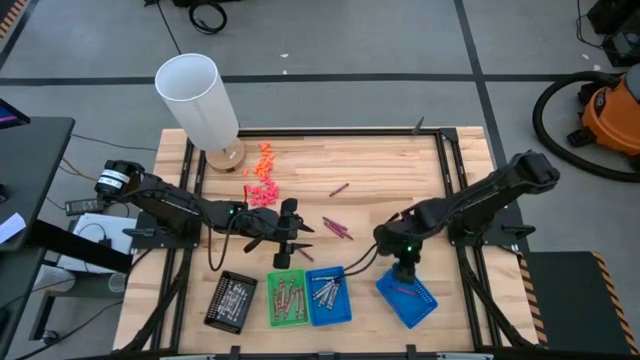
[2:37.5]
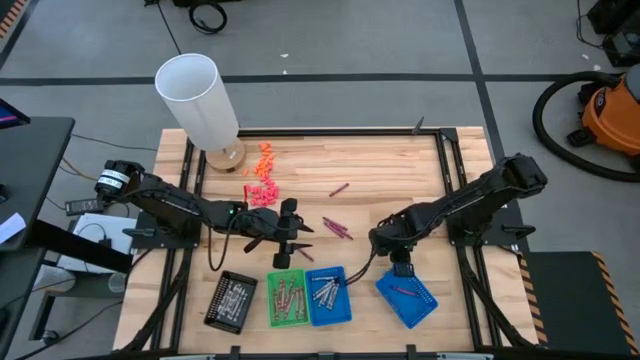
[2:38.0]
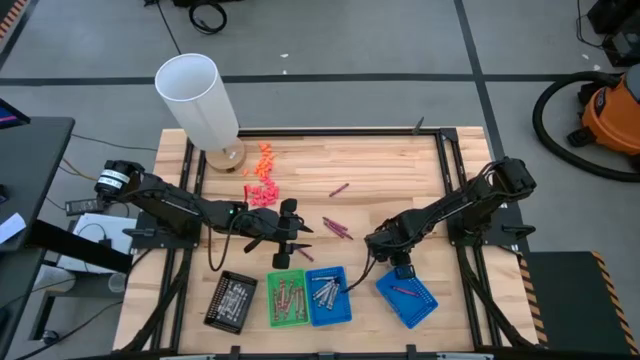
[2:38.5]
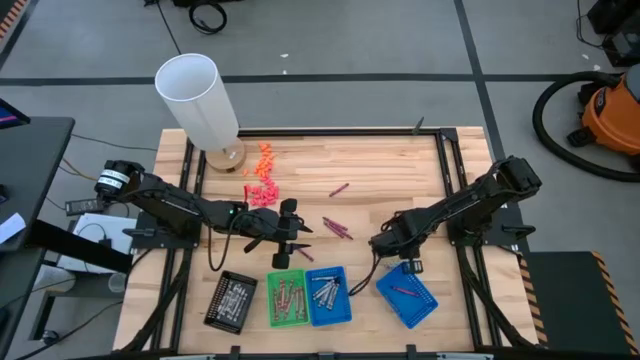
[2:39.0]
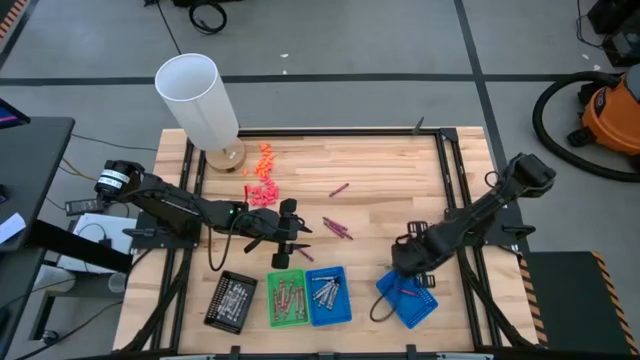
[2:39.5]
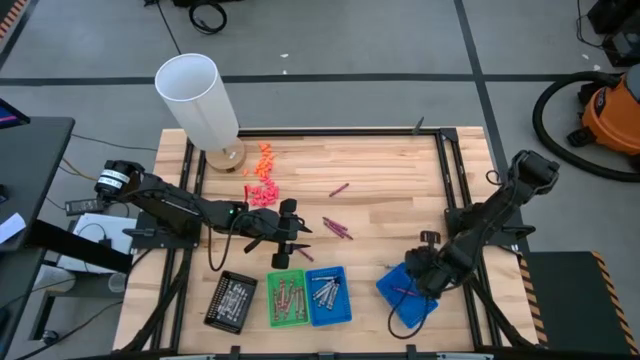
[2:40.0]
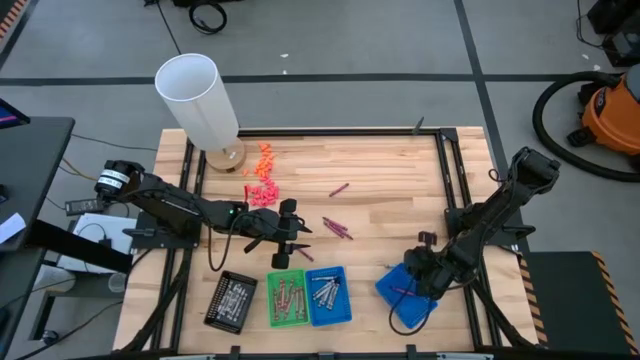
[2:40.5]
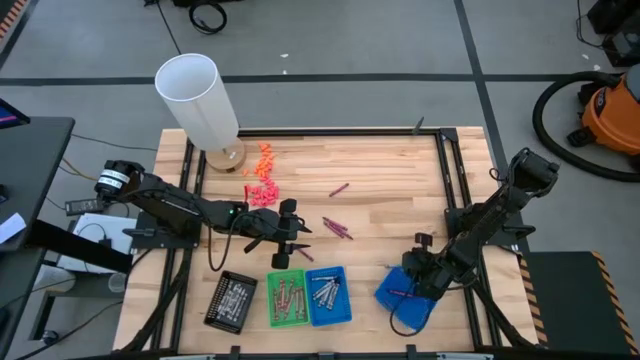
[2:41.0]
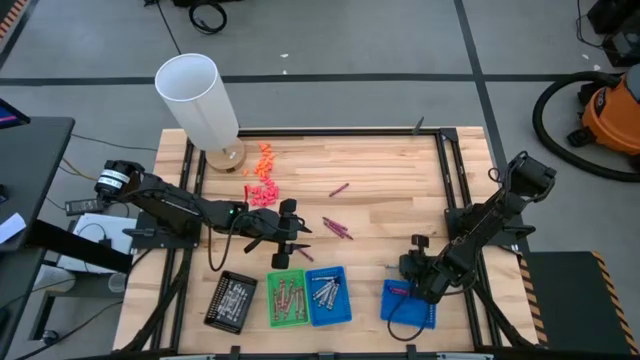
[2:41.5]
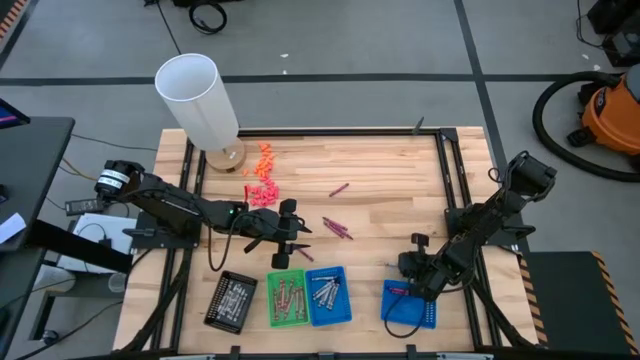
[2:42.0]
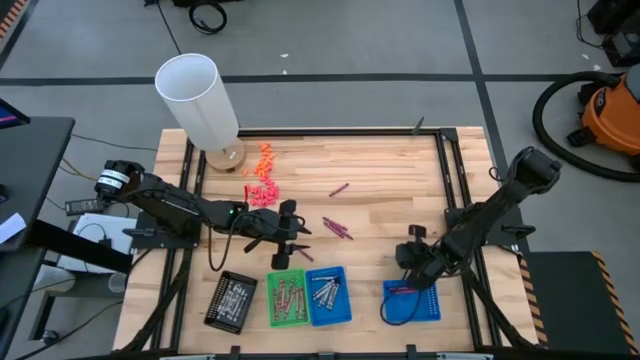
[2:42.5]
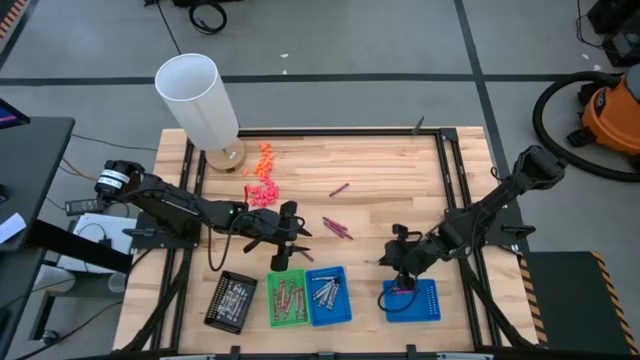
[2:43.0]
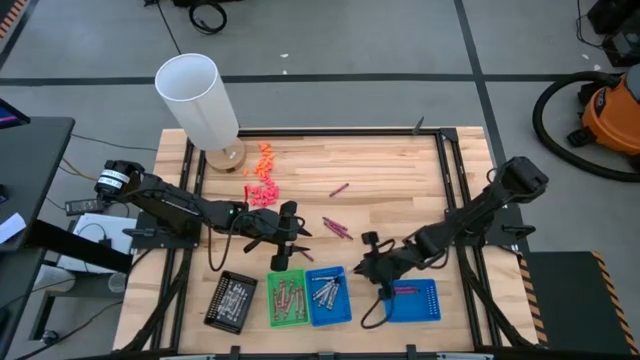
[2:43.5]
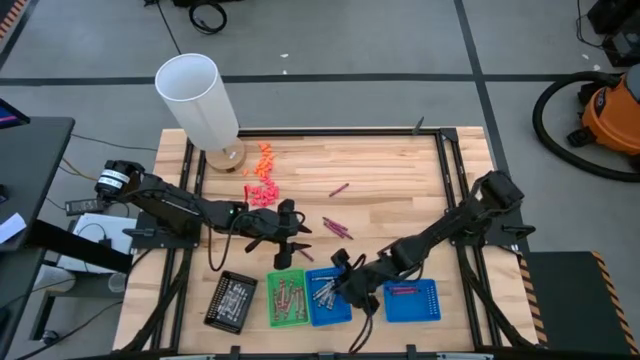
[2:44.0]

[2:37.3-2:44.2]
Task: Sort crayons
Put the black crayon into the left blue bin

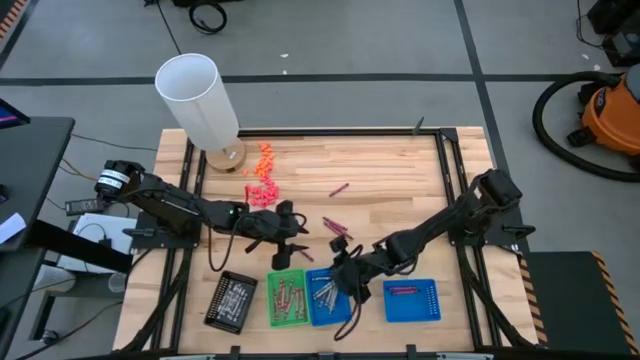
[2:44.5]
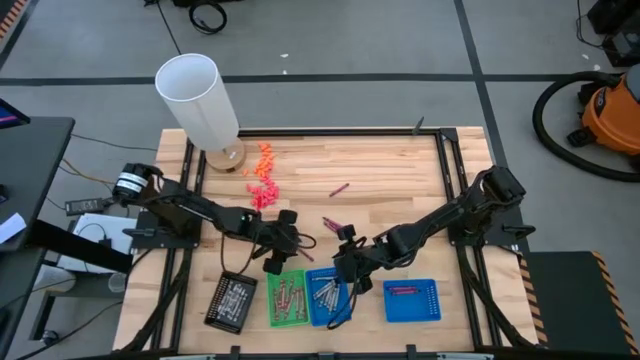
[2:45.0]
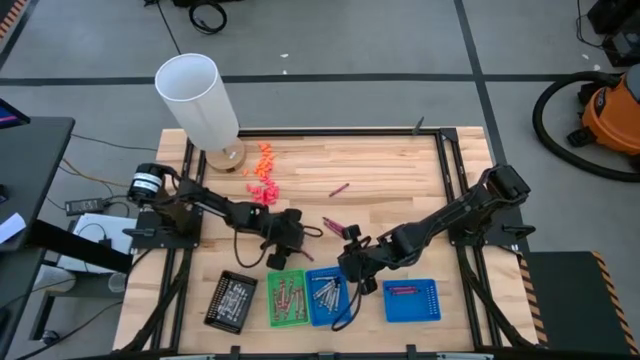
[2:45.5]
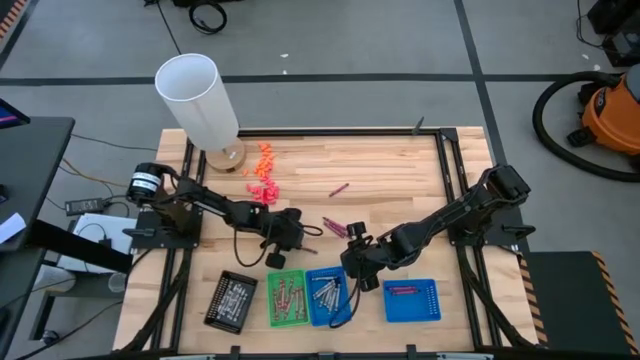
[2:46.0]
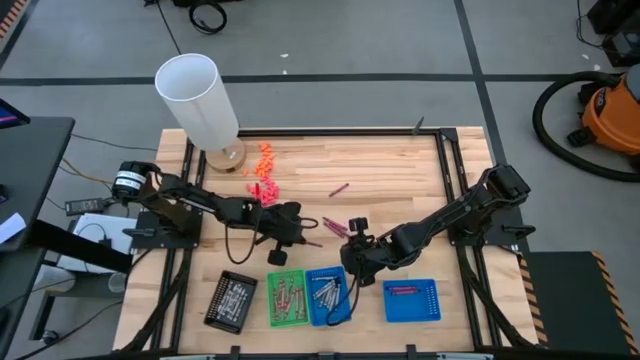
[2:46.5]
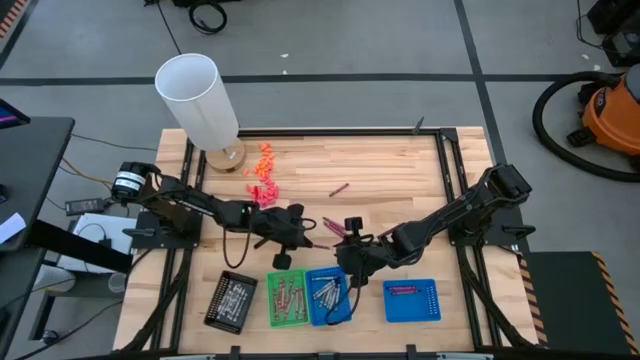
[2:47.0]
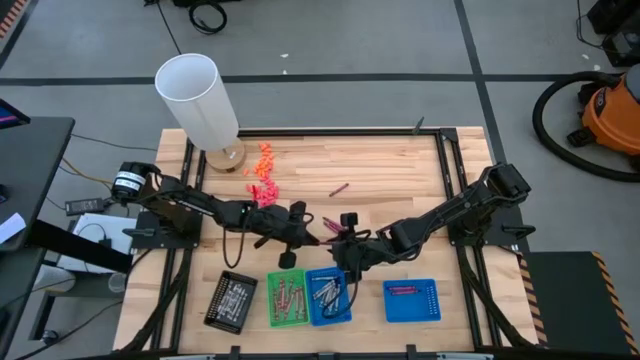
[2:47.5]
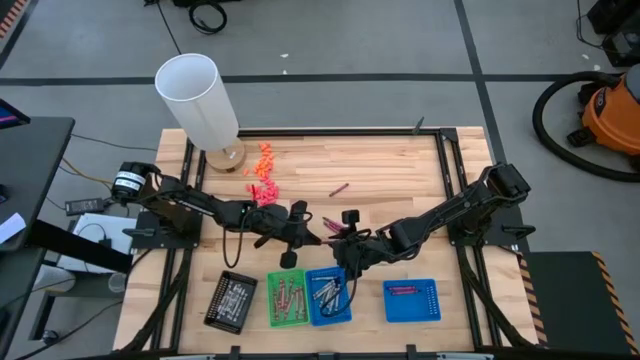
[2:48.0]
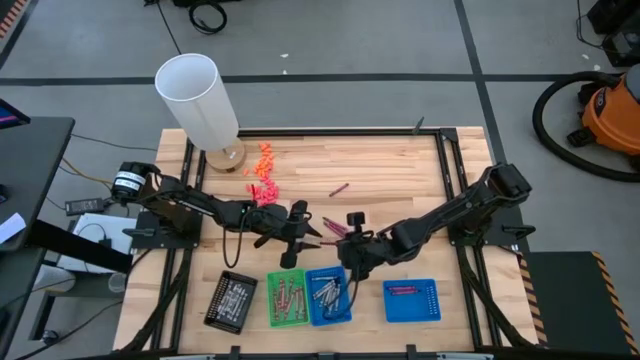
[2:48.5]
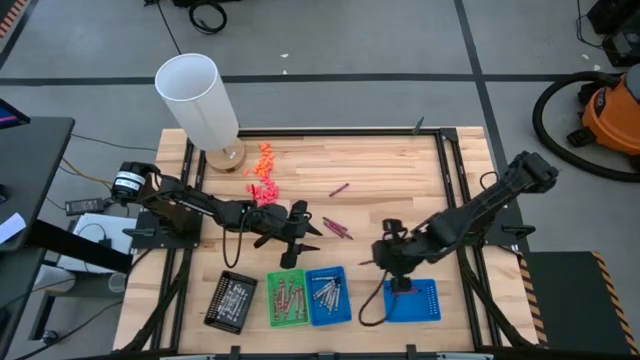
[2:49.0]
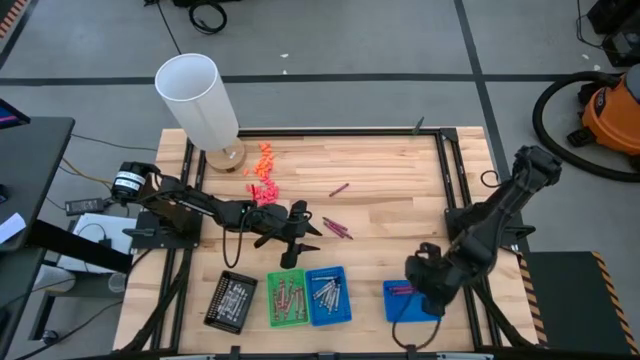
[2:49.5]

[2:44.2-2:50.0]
Put the red crayon into the right blue bin

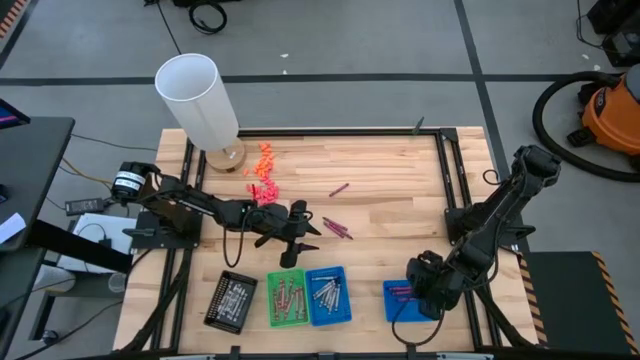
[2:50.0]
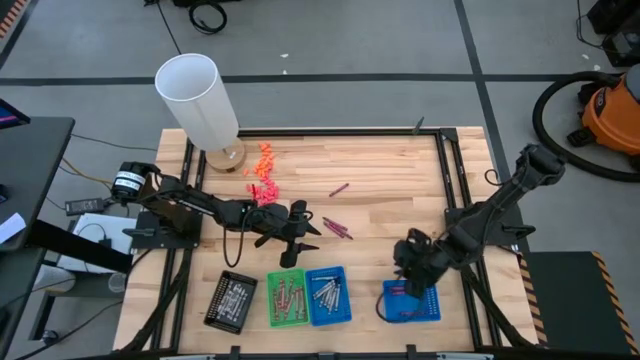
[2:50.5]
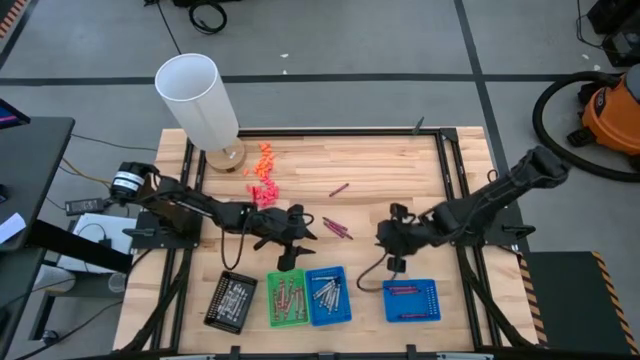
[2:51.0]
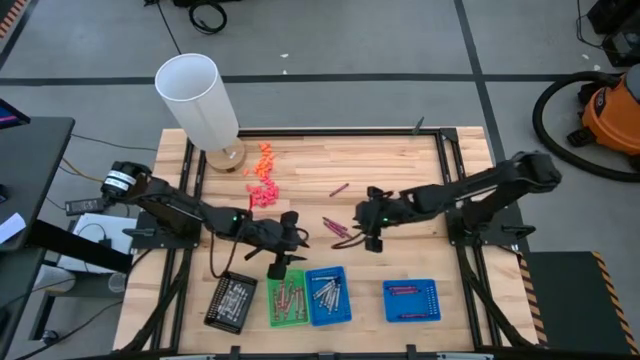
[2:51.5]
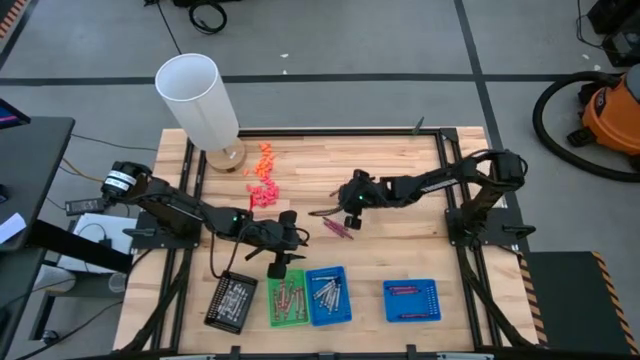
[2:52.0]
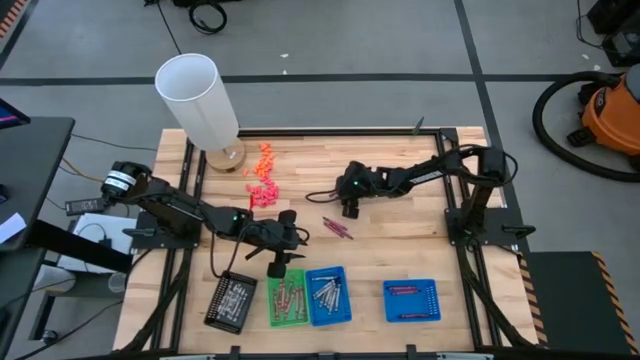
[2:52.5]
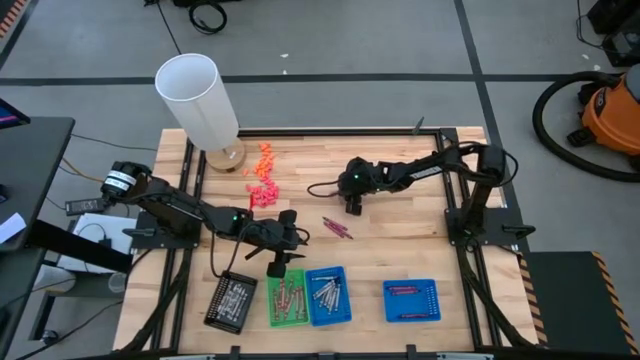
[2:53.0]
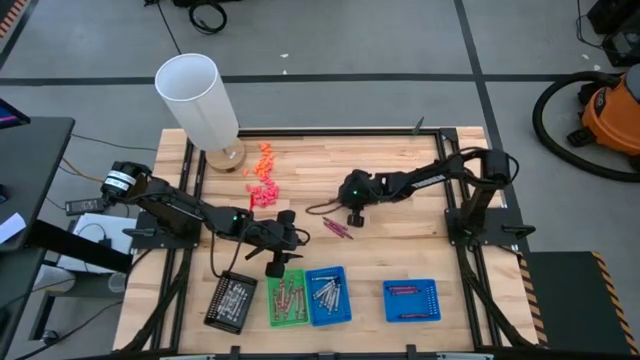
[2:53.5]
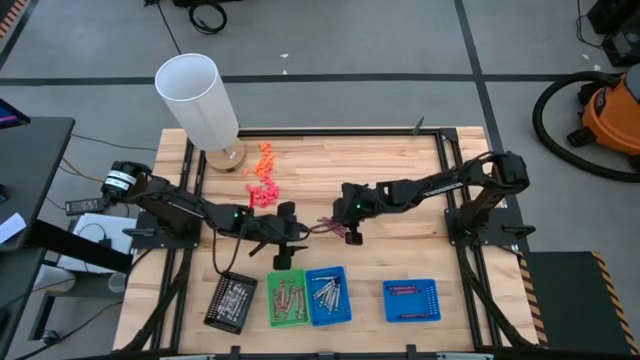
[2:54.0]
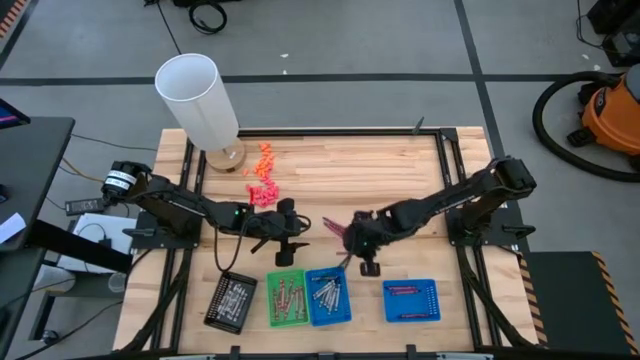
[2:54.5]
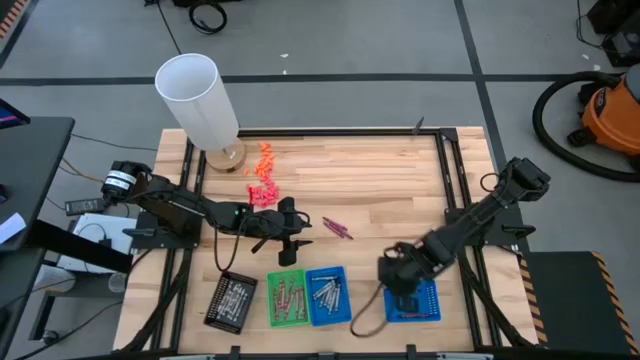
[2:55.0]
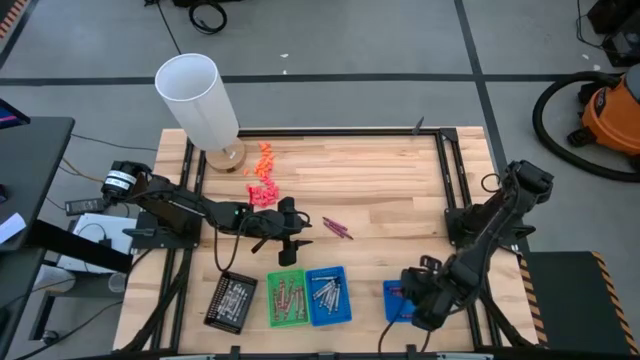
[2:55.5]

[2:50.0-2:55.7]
Put the red crayon into the right blue bin

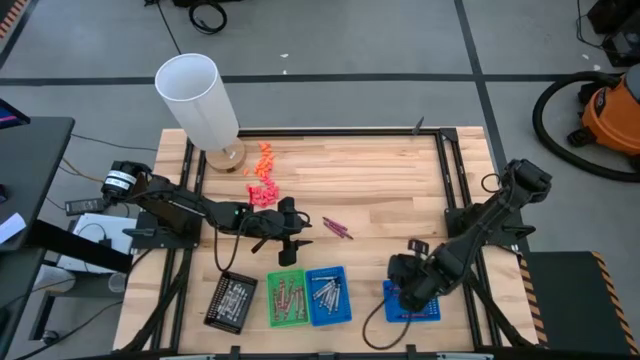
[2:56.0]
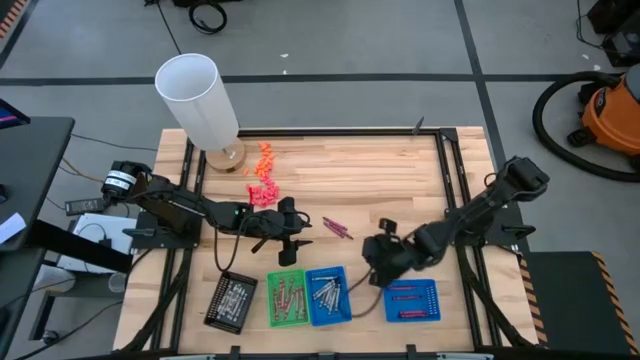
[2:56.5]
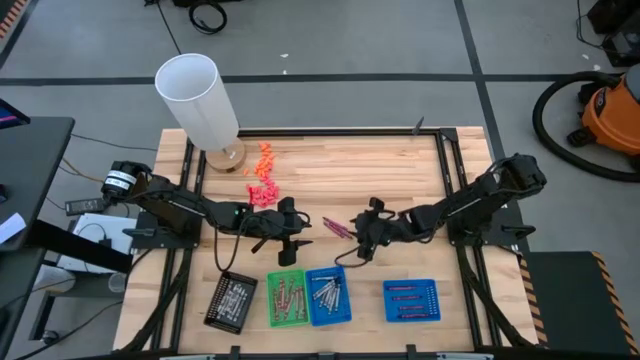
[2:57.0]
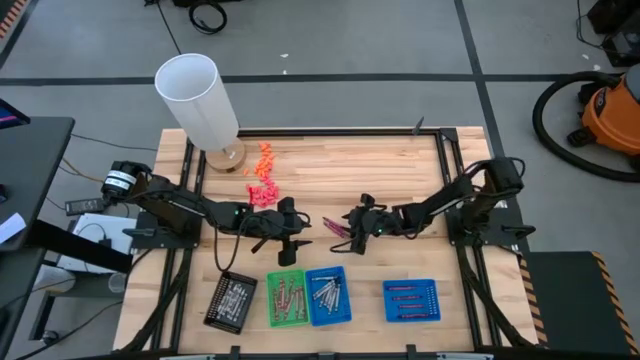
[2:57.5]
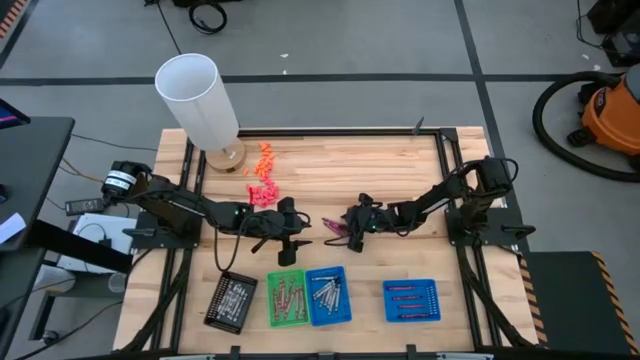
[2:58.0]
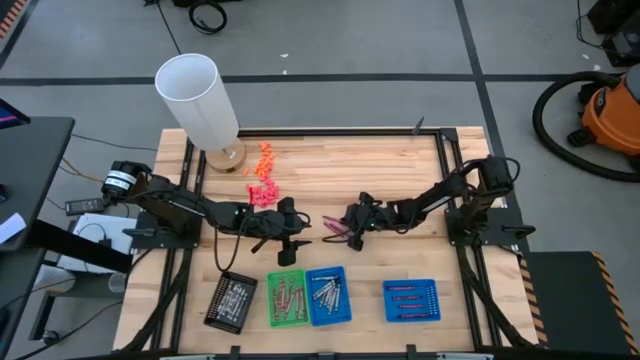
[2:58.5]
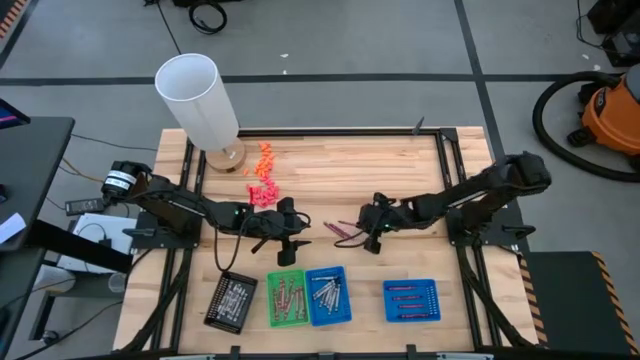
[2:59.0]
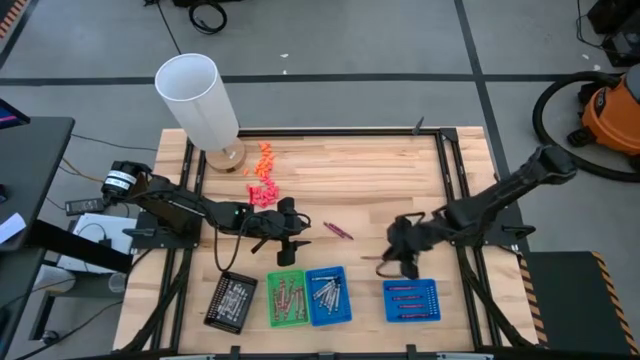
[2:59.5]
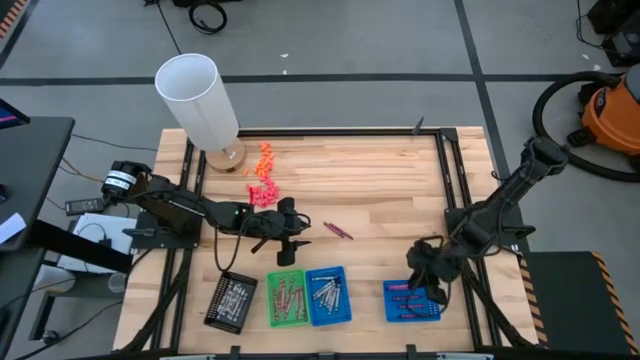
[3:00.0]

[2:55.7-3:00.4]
Put the red crayon into the right blue bin
